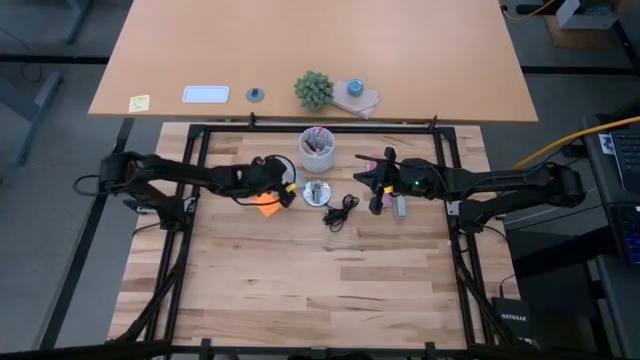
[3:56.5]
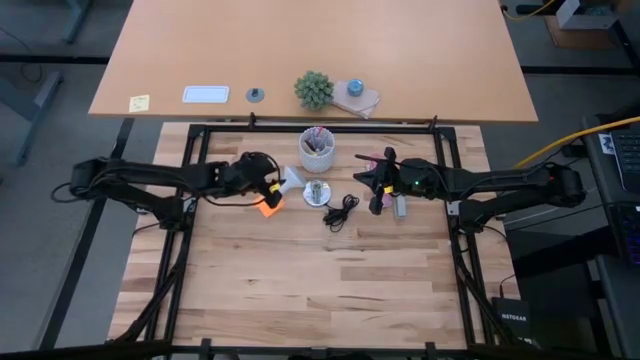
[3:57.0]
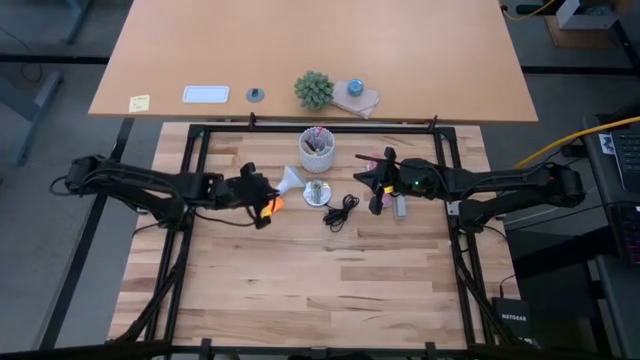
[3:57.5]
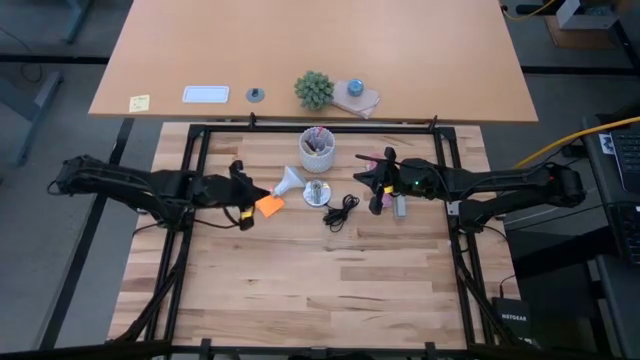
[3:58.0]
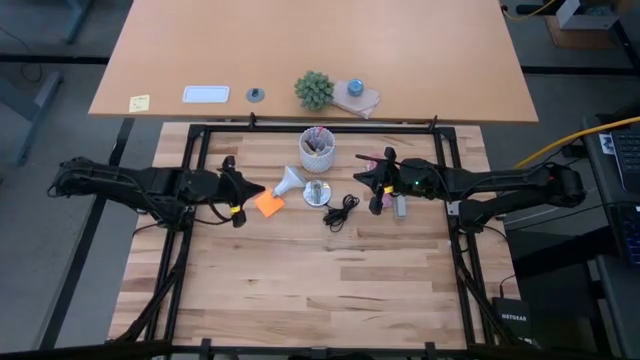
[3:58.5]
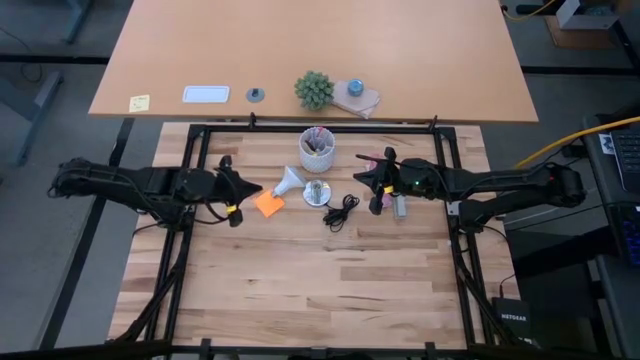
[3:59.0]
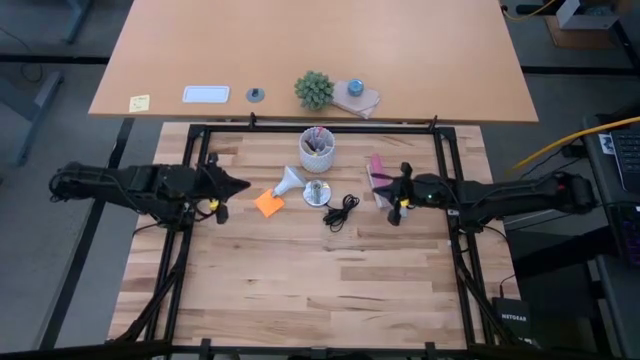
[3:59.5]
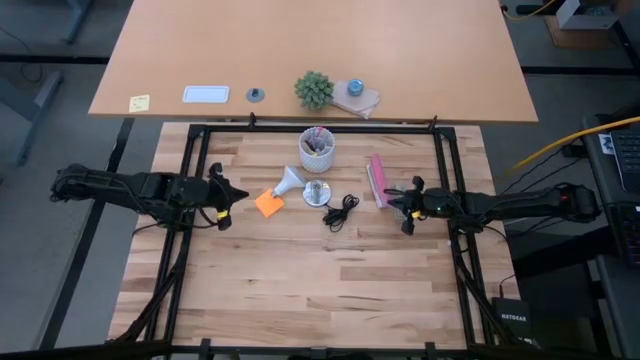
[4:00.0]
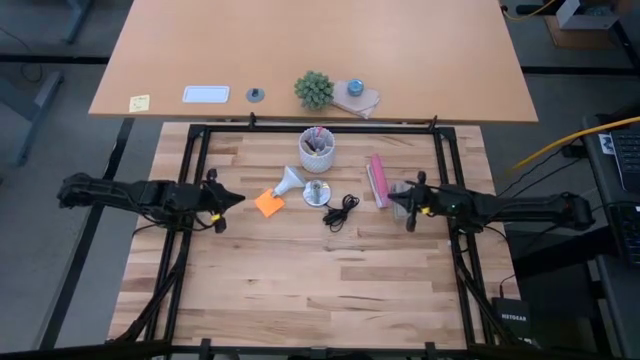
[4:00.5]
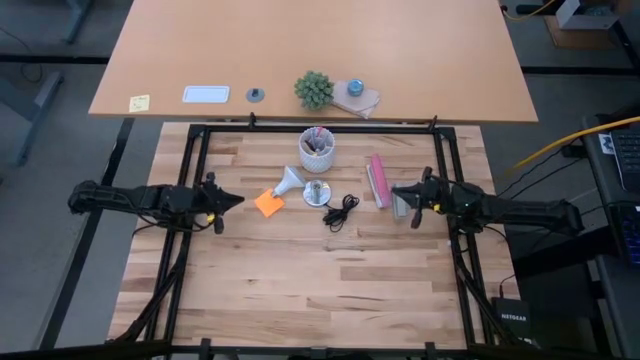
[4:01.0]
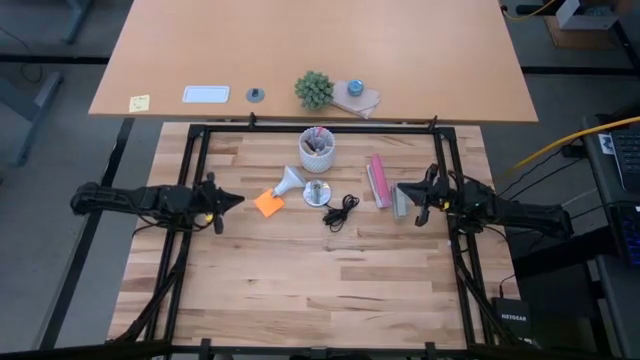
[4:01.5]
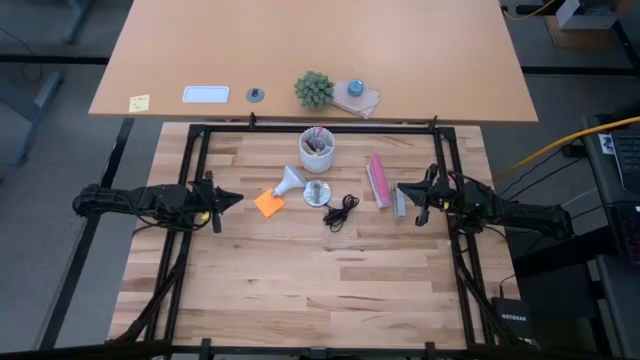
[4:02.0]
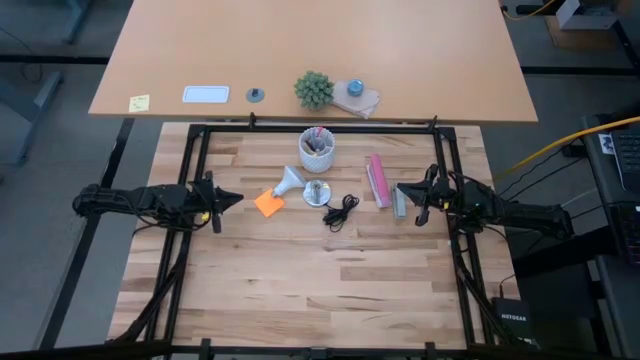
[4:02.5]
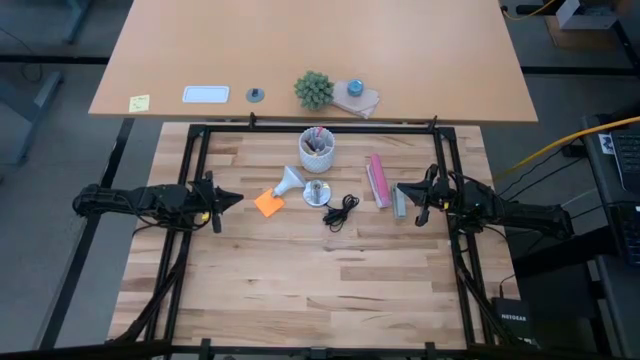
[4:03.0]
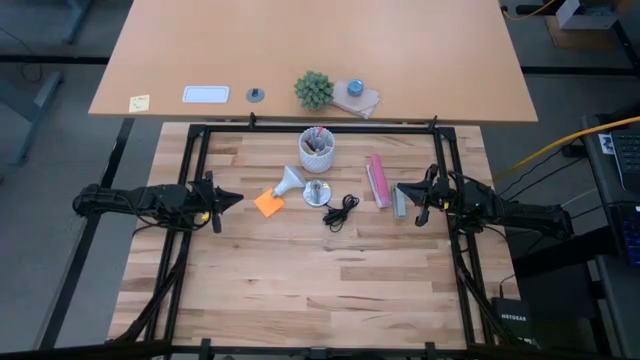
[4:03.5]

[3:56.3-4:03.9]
Task: Screw lightbulb
Return to Home Position

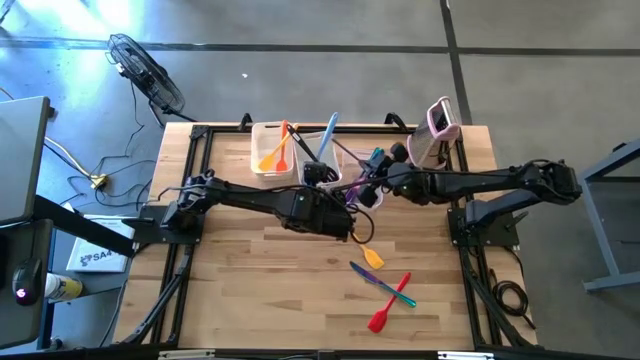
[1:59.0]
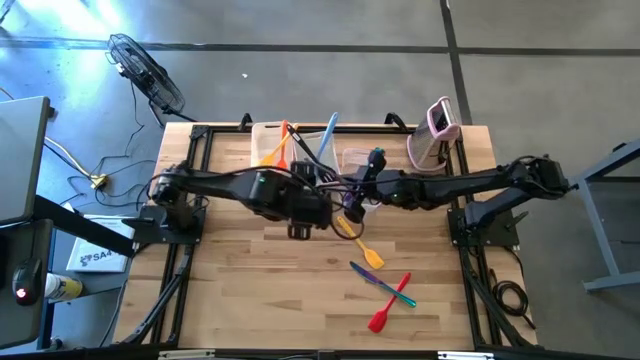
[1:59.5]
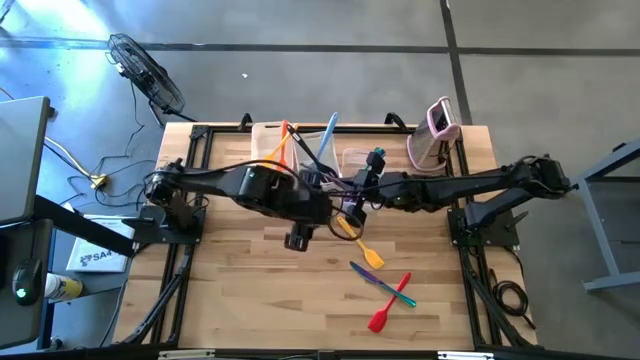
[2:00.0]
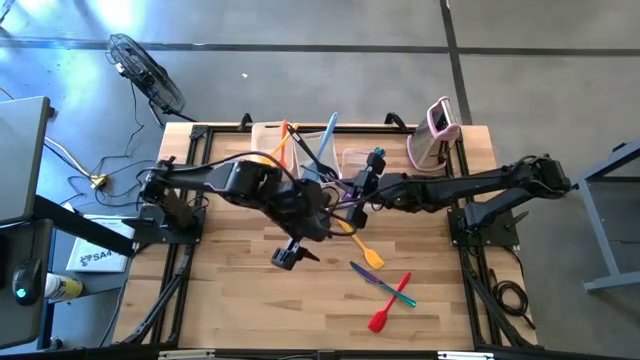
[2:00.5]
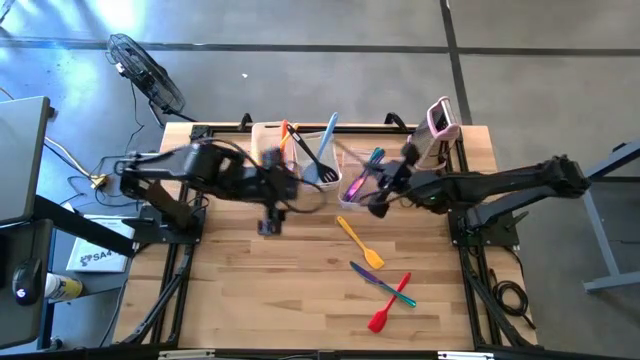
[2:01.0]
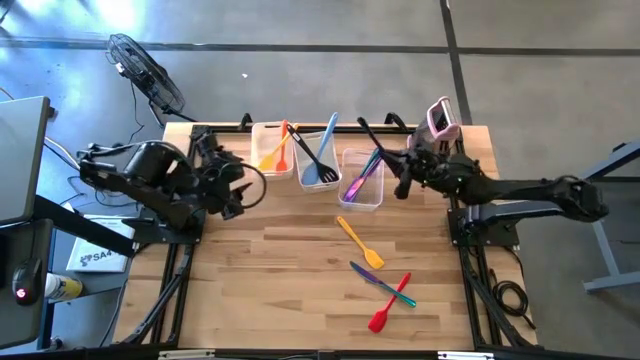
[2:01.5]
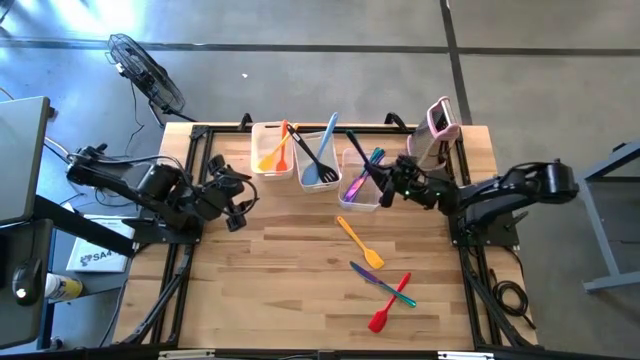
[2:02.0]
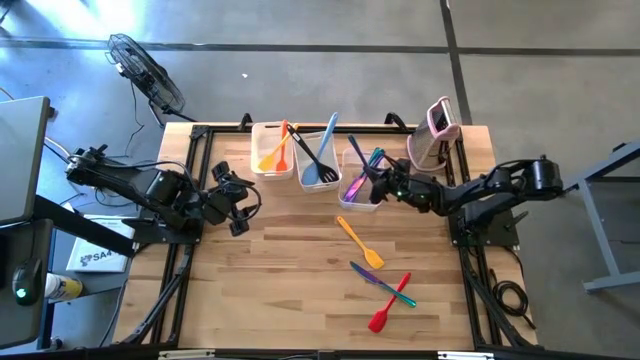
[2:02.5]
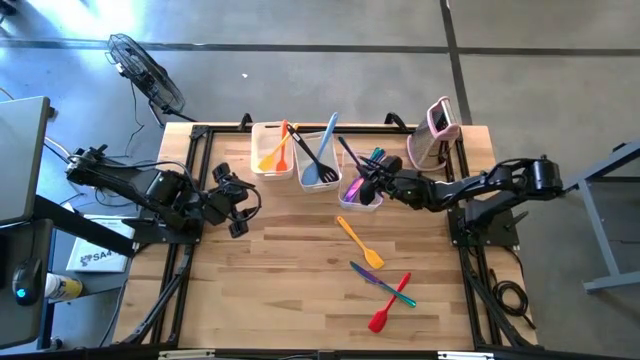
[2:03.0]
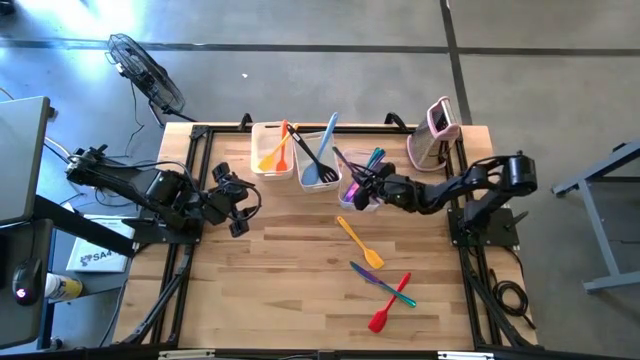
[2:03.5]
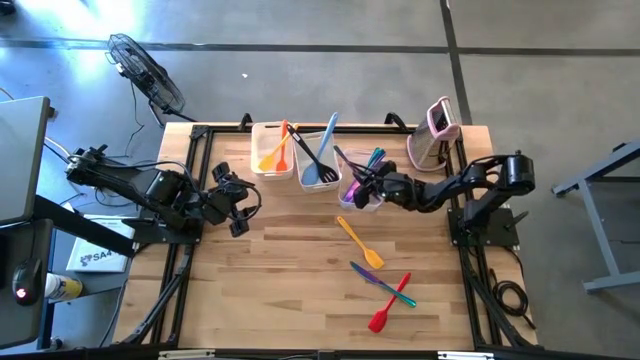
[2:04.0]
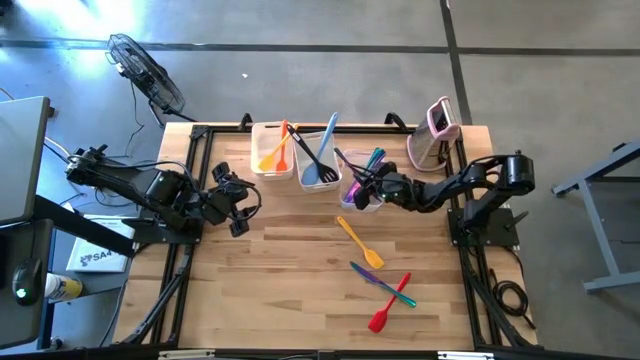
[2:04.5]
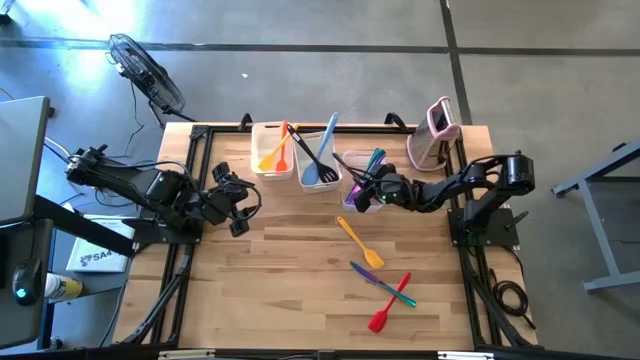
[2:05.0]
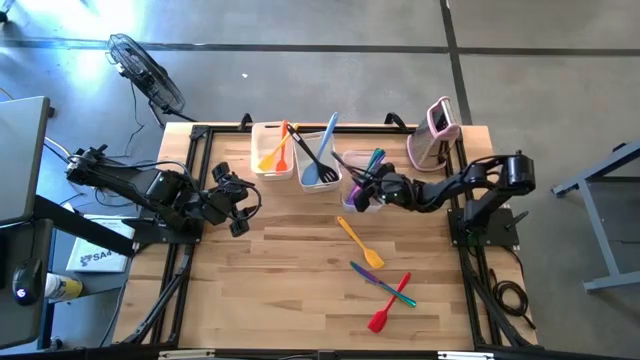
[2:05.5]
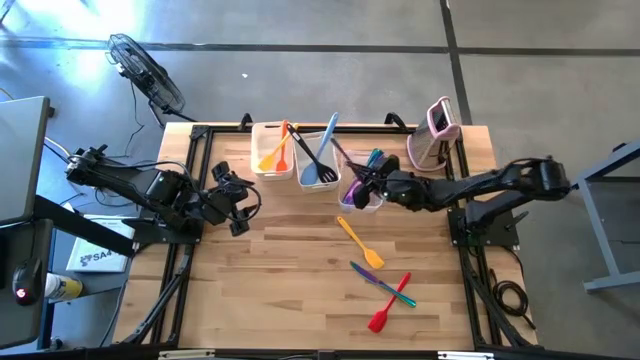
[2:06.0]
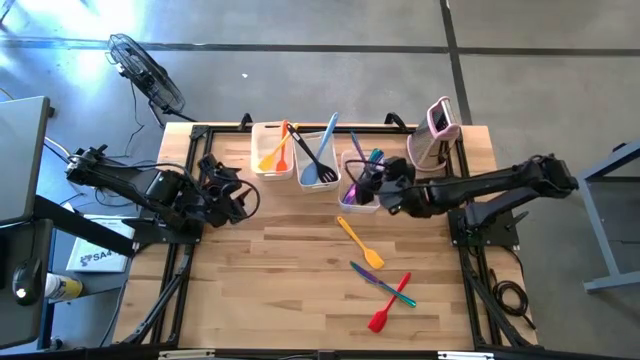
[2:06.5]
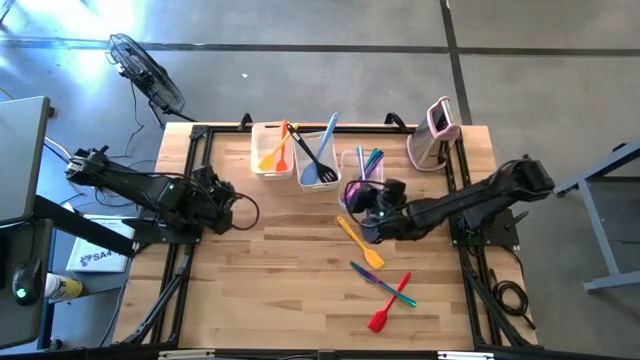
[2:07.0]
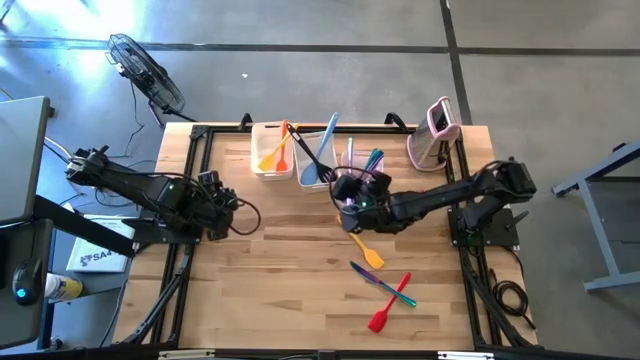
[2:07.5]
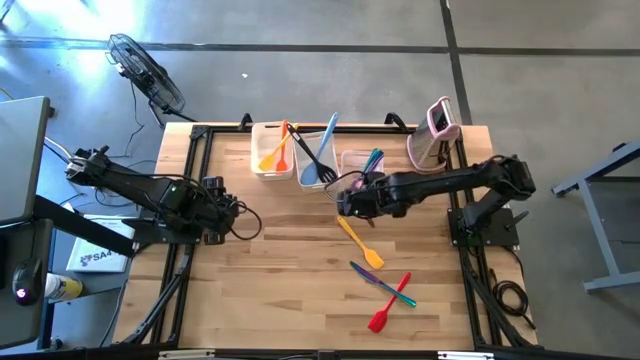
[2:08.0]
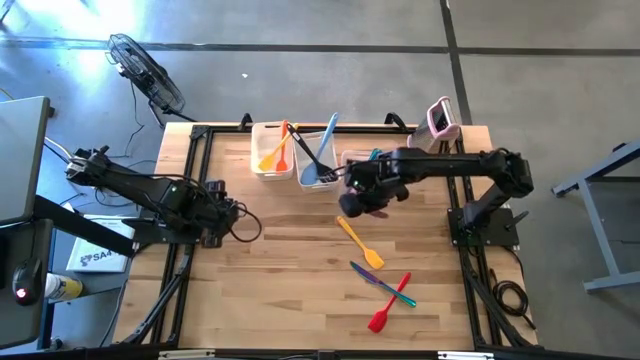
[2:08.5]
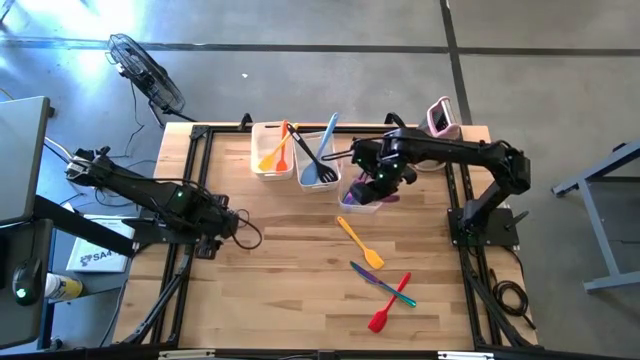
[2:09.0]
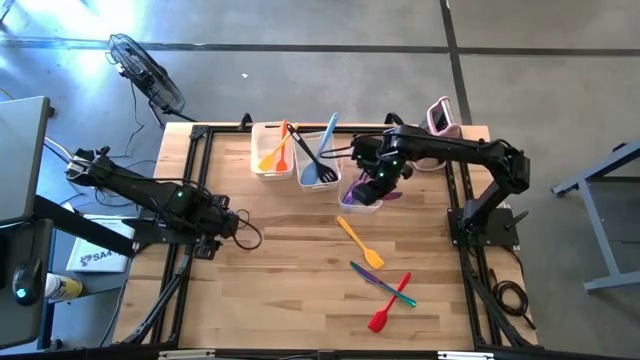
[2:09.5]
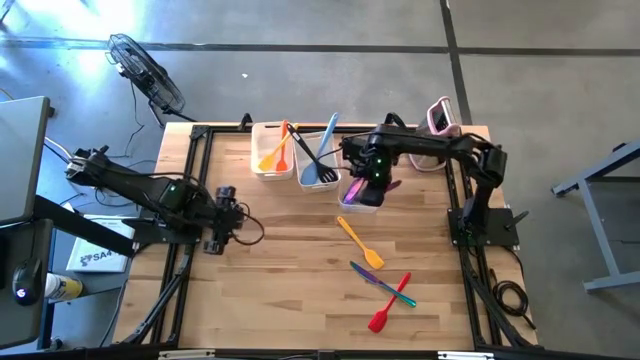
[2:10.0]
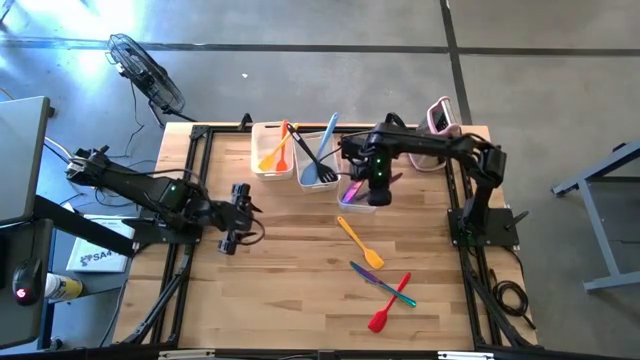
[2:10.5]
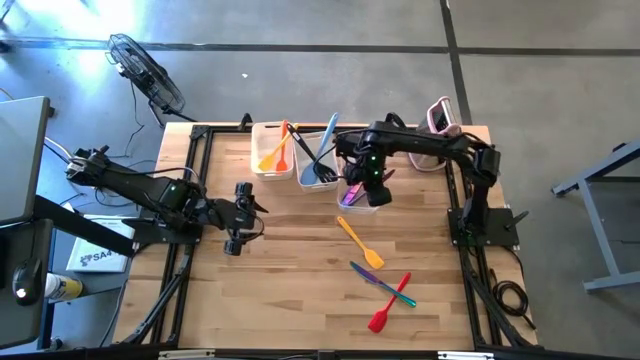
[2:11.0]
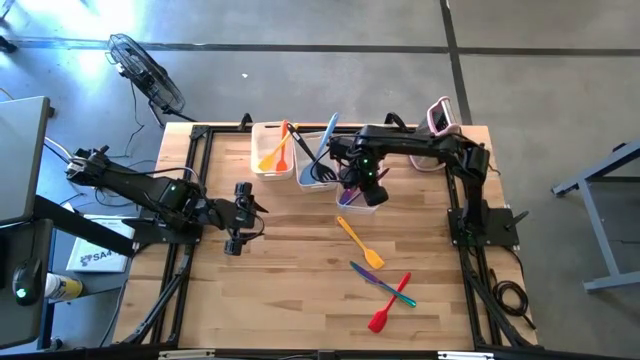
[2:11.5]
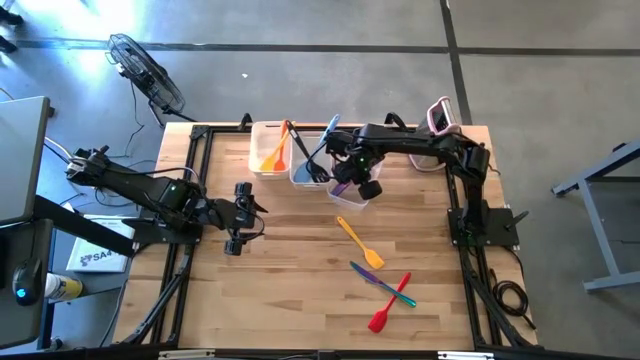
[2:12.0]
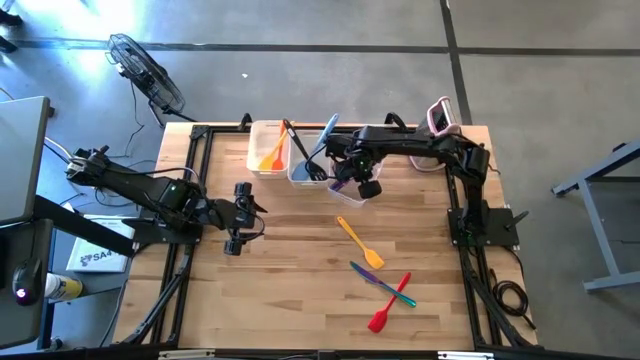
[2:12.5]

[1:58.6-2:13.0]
Task: Pick & Place Kitchen Items
Put the purple table knife into the transparent bin
